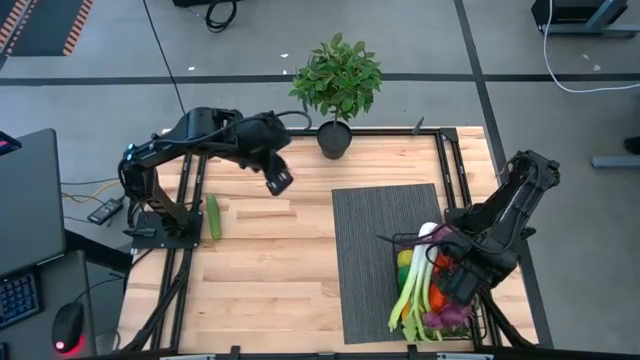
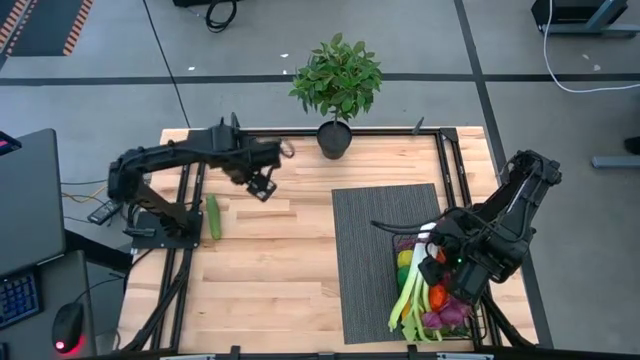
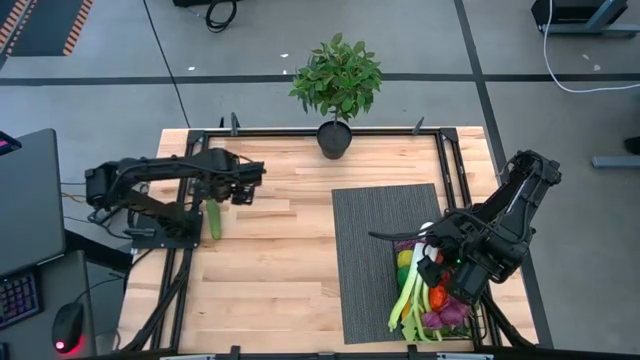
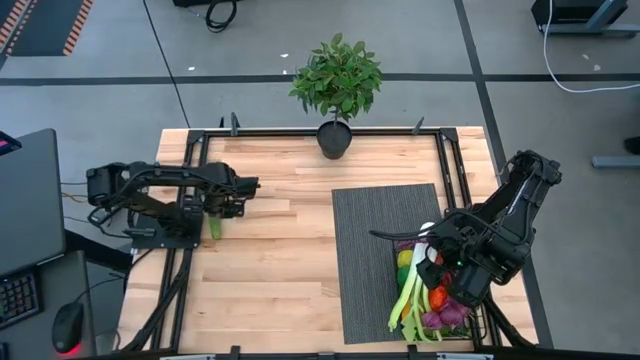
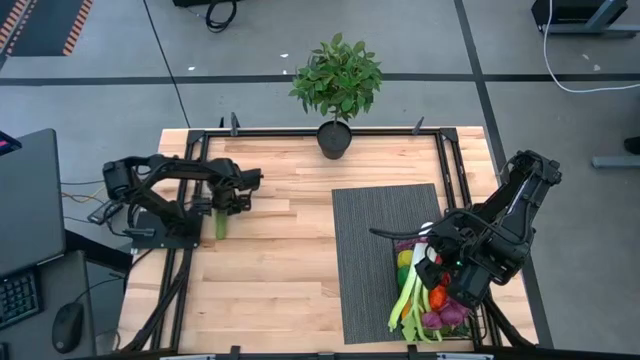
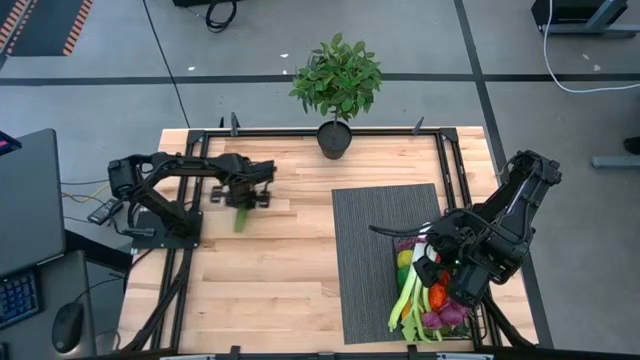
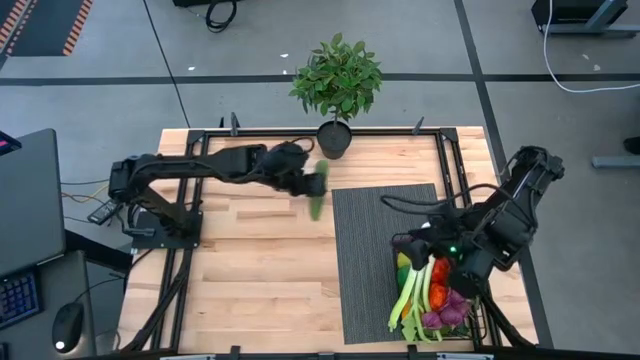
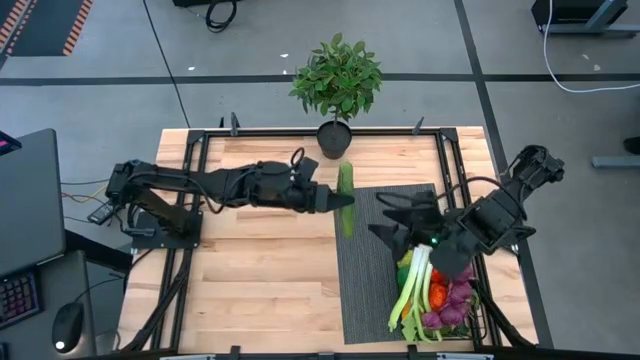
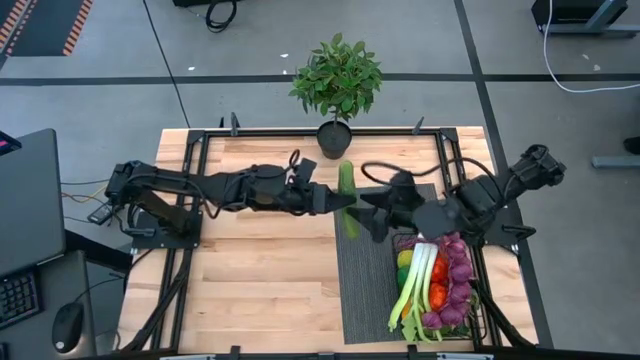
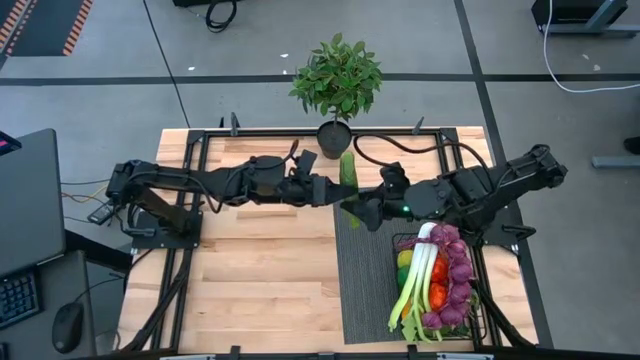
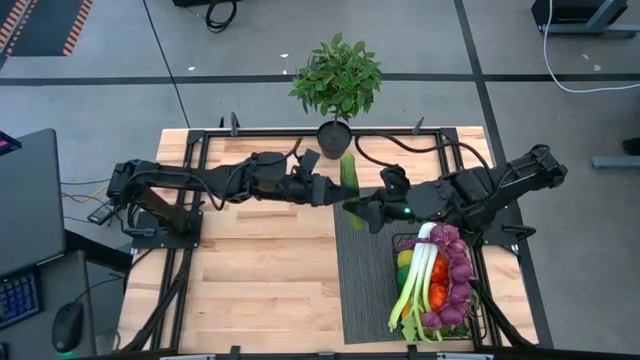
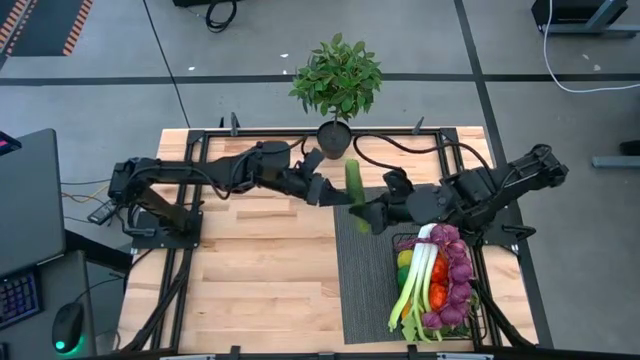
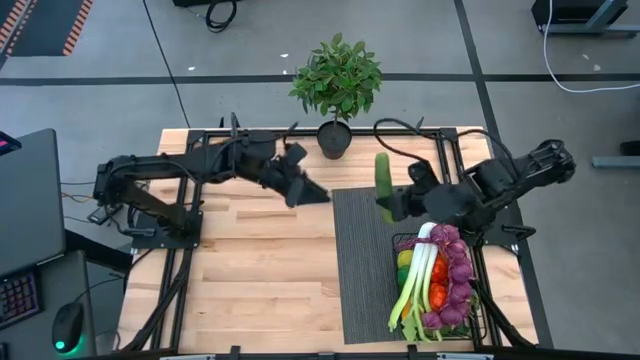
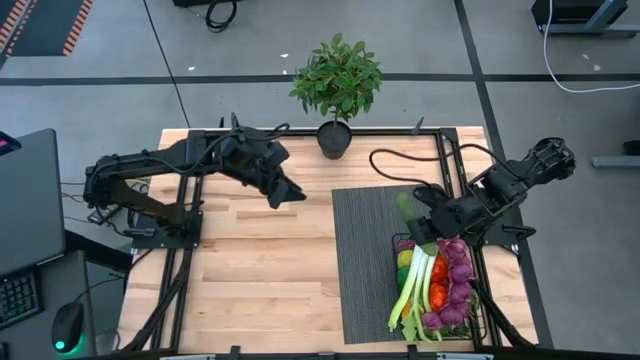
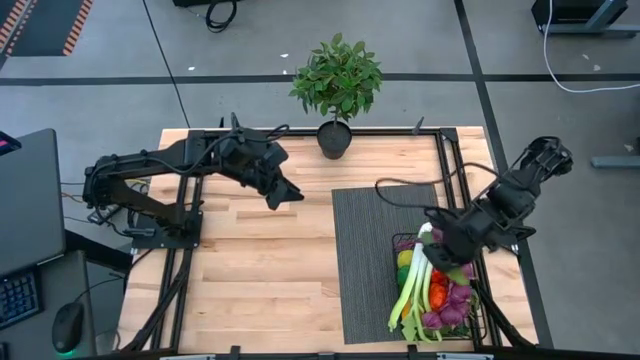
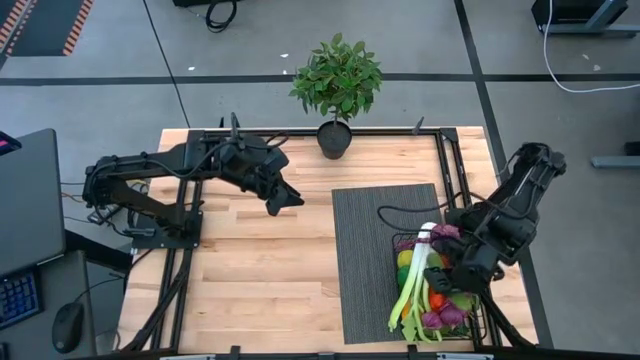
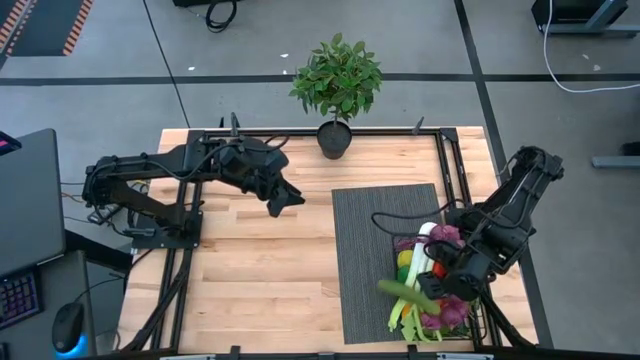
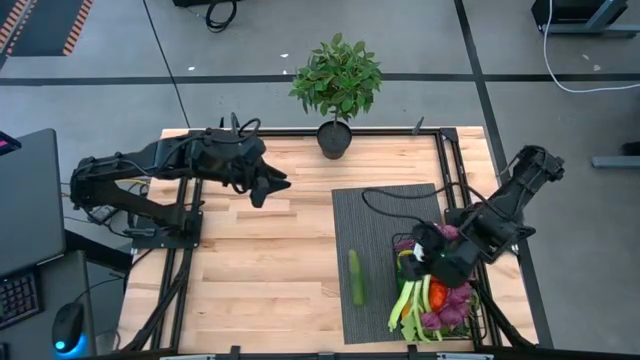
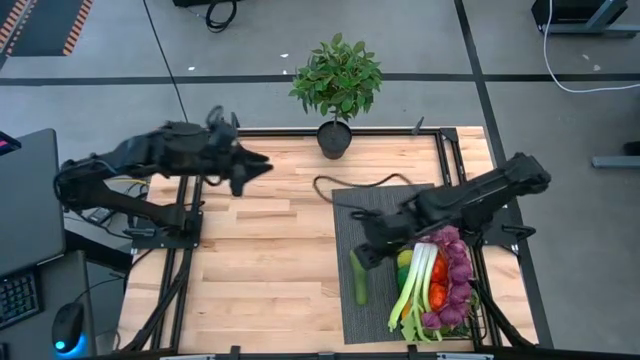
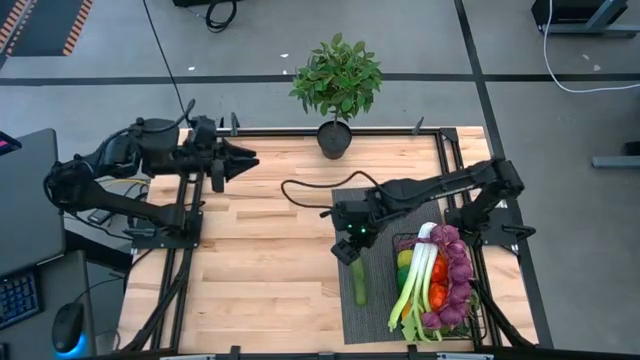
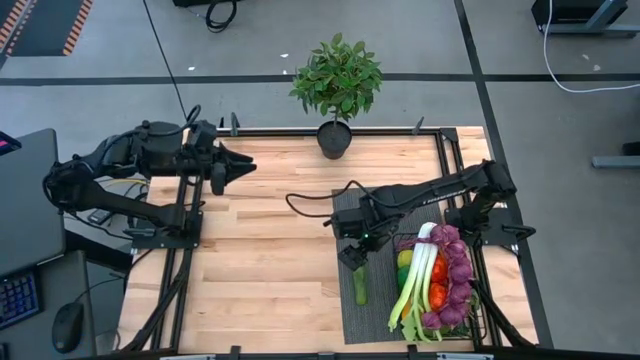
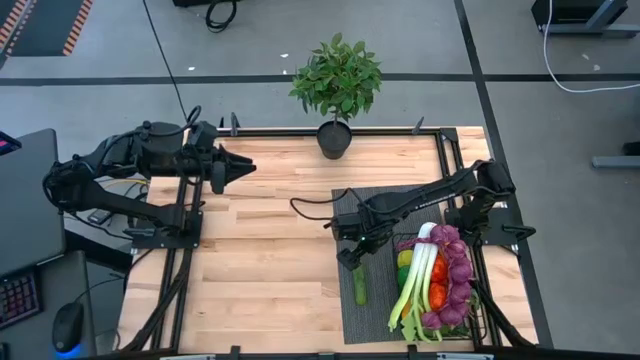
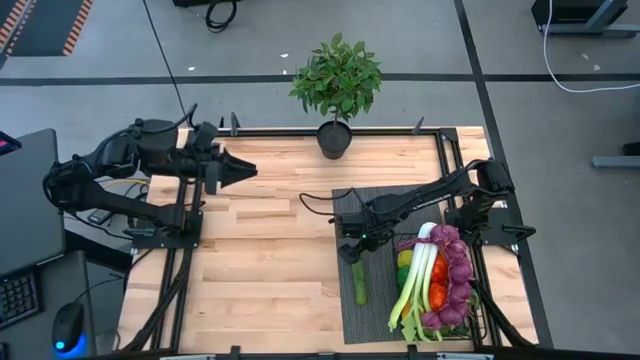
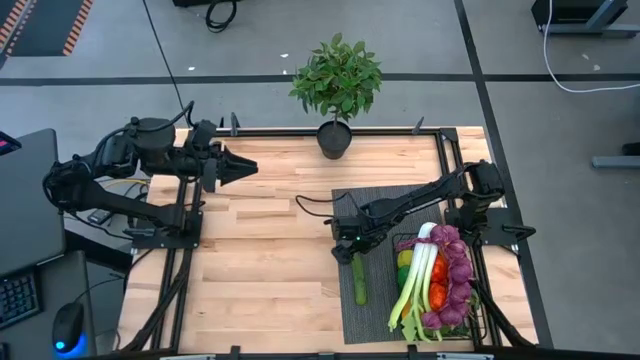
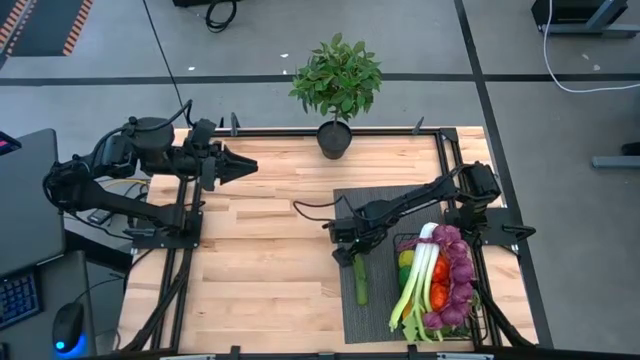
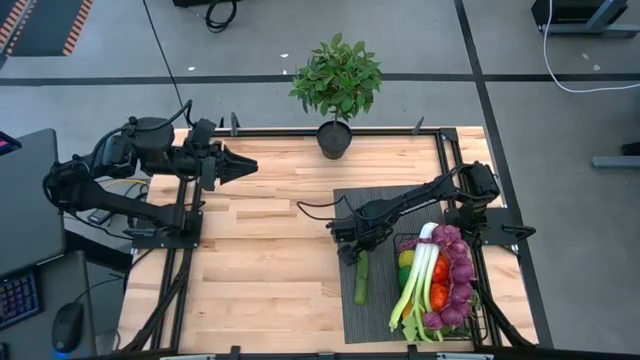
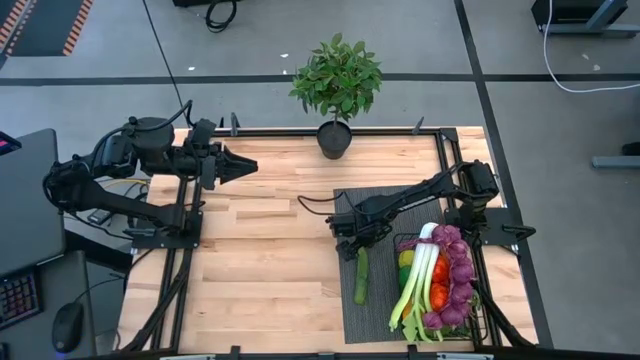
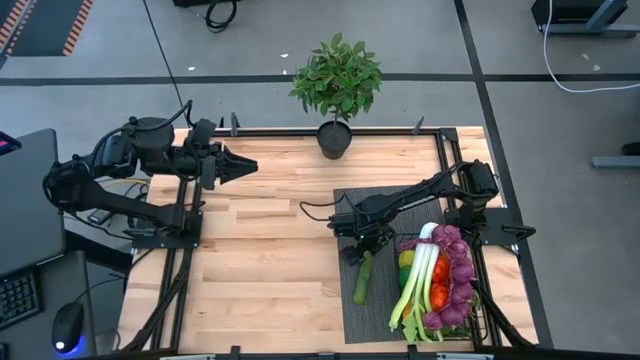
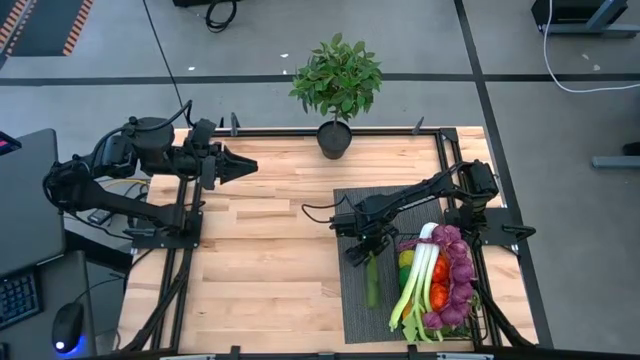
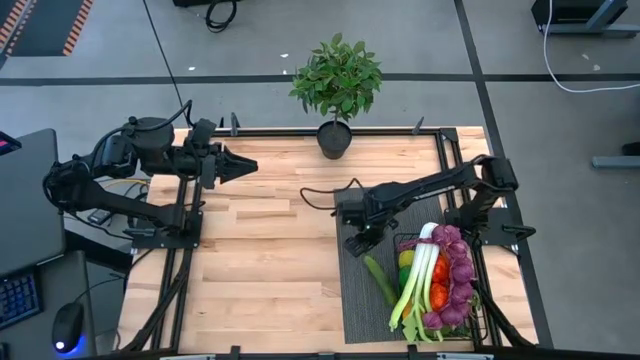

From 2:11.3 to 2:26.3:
Task: Build produce basket
Put the cucumber into the black wire basket

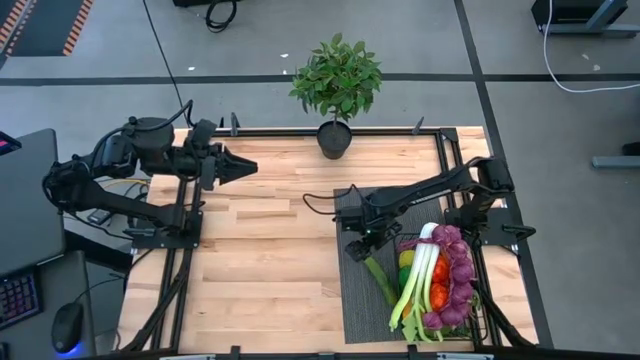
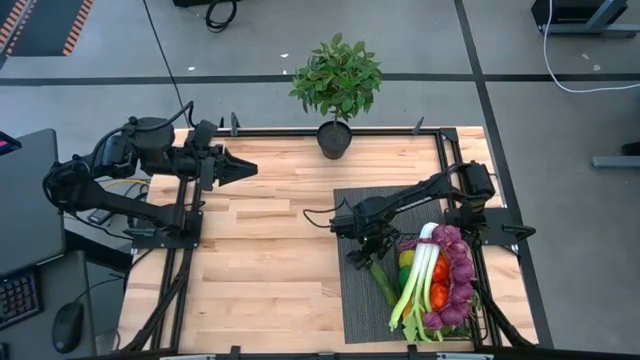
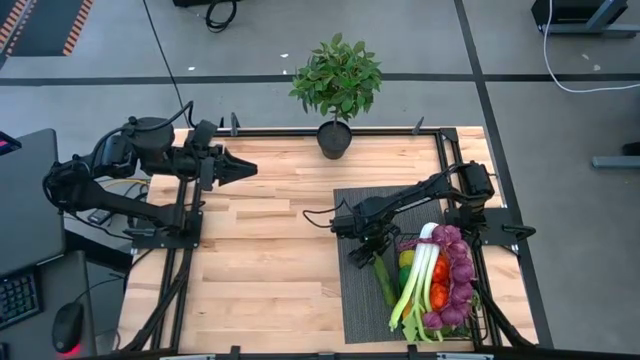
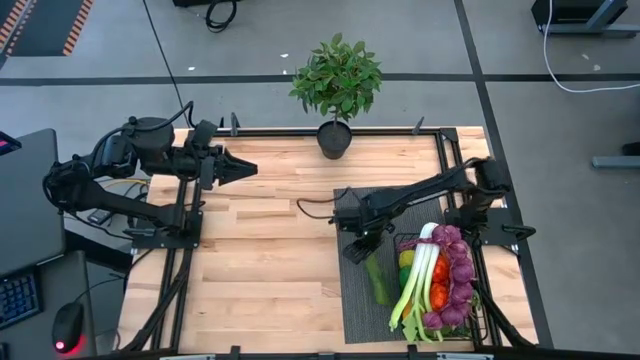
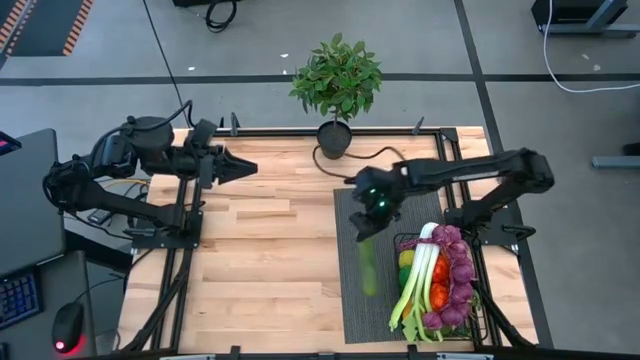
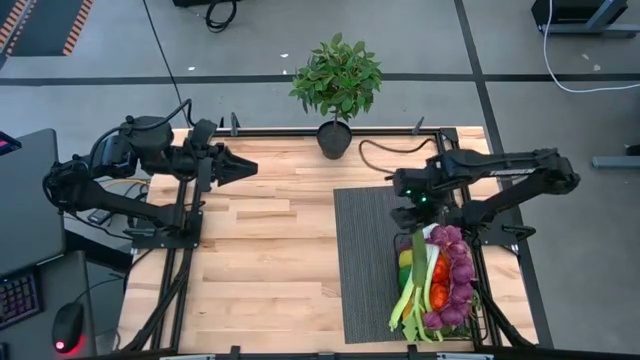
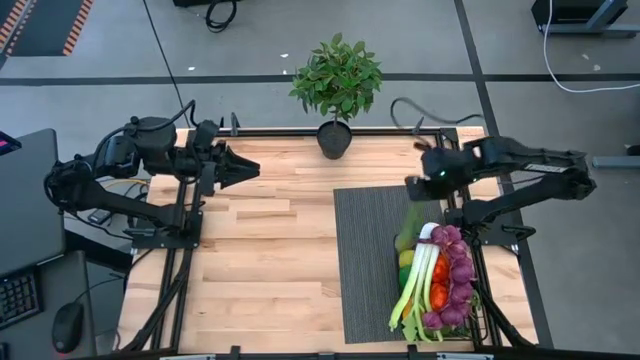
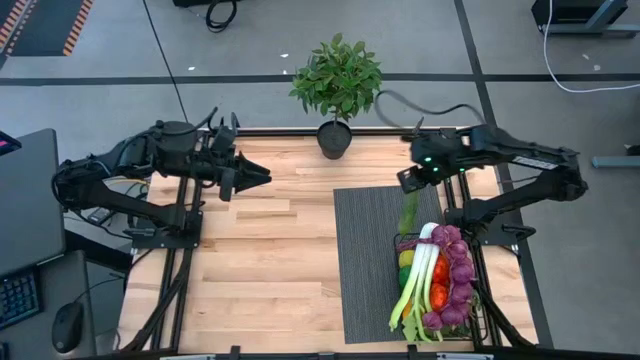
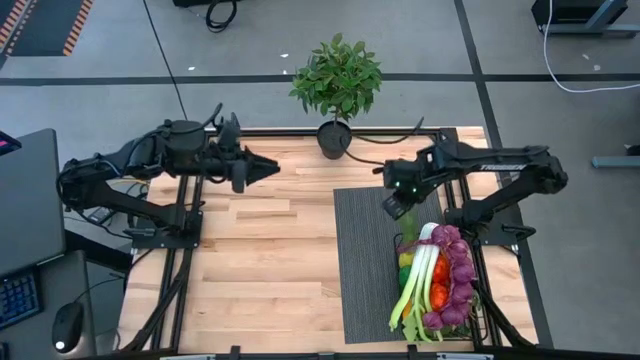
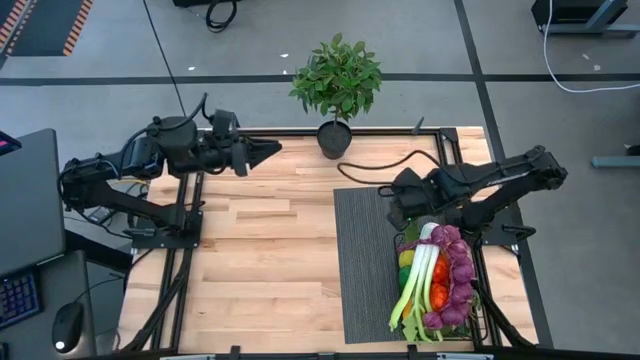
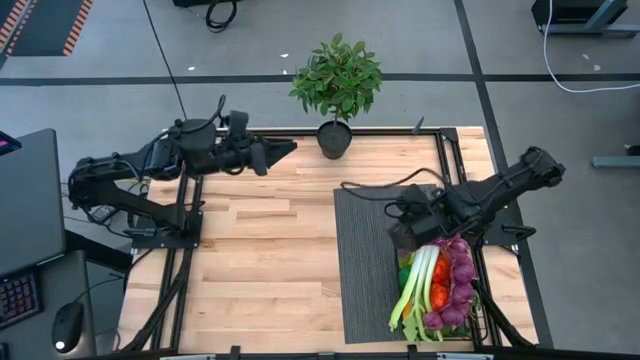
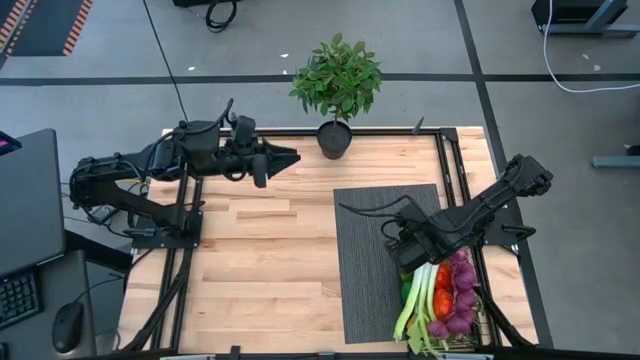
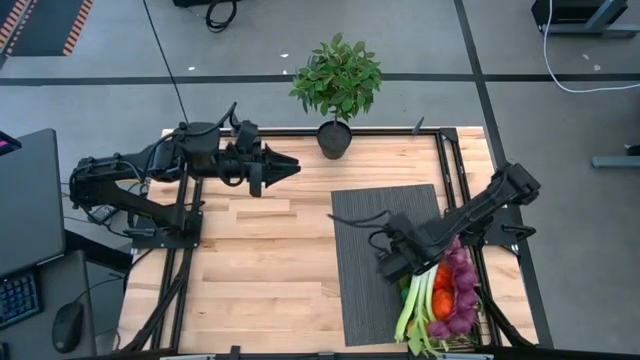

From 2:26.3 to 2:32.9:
Put the cucumber into the black wire basket
